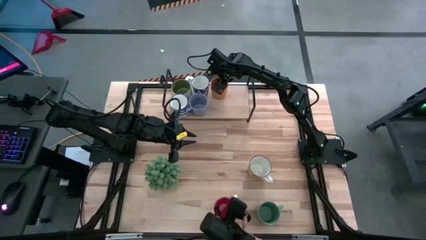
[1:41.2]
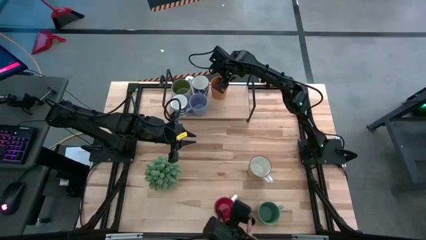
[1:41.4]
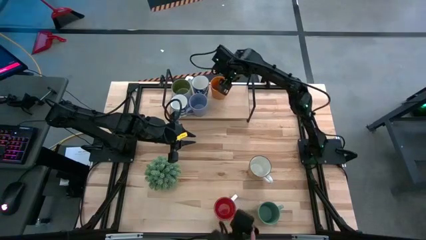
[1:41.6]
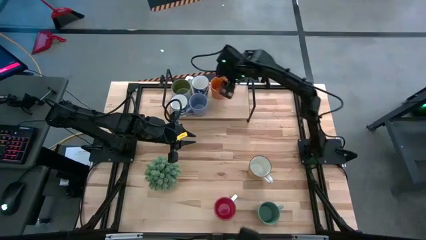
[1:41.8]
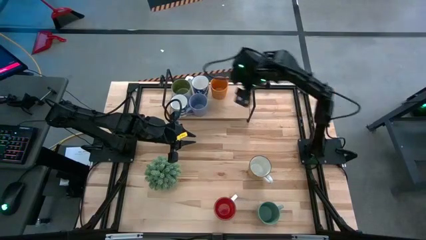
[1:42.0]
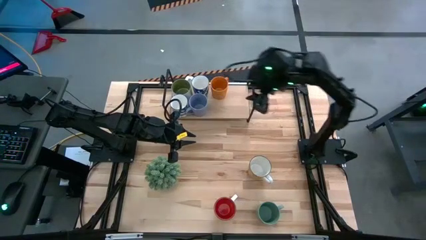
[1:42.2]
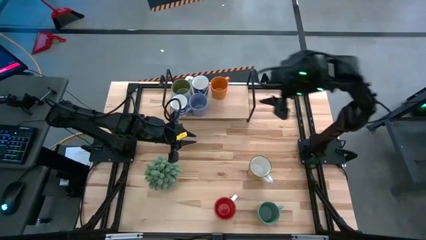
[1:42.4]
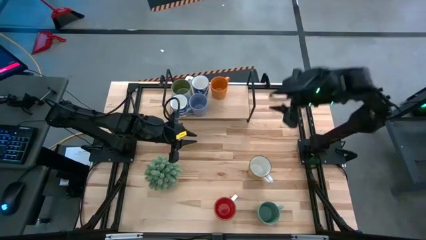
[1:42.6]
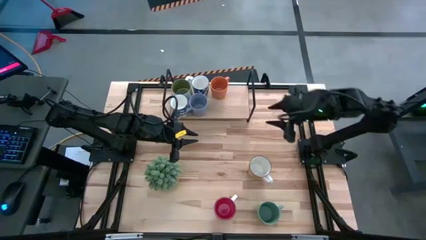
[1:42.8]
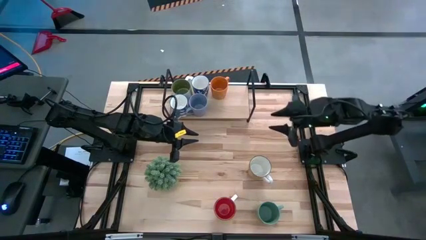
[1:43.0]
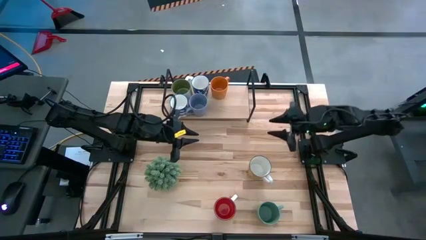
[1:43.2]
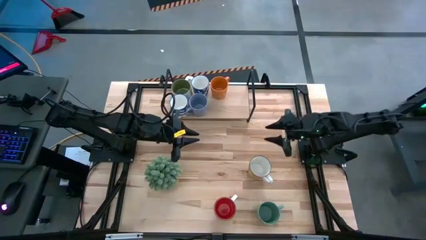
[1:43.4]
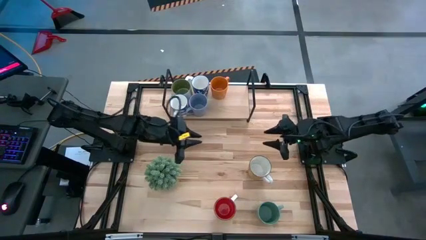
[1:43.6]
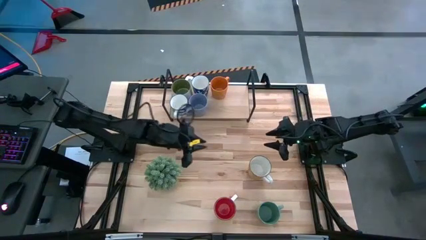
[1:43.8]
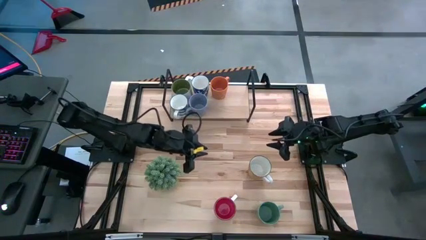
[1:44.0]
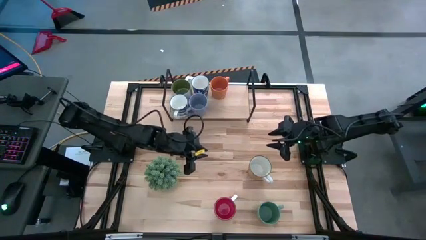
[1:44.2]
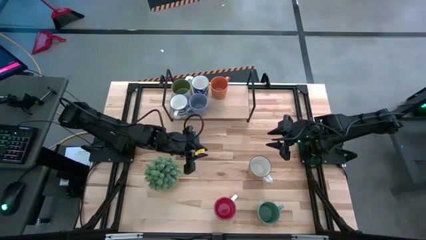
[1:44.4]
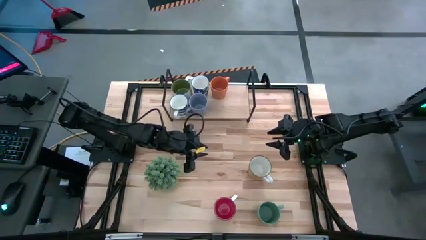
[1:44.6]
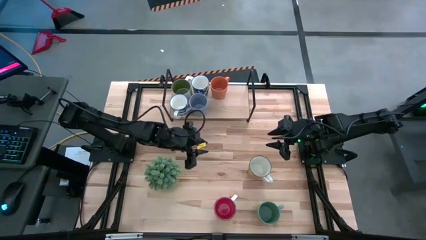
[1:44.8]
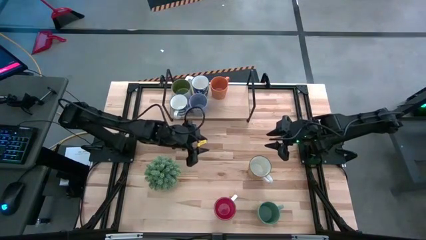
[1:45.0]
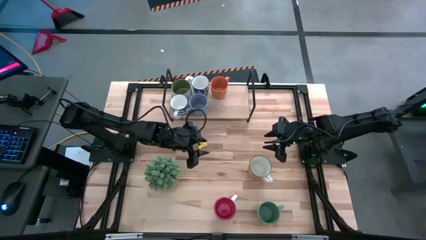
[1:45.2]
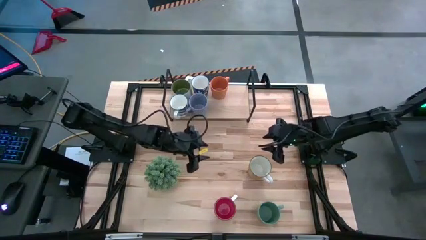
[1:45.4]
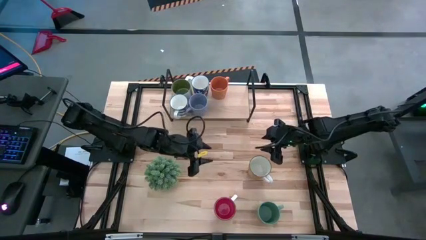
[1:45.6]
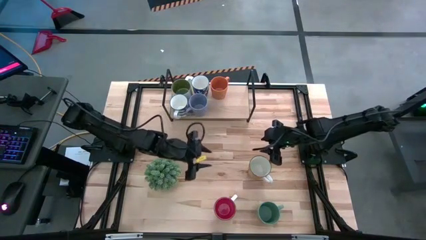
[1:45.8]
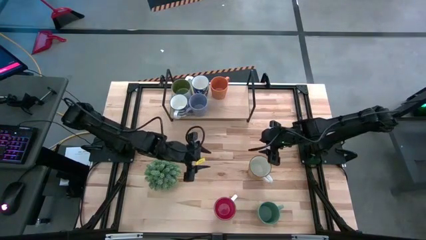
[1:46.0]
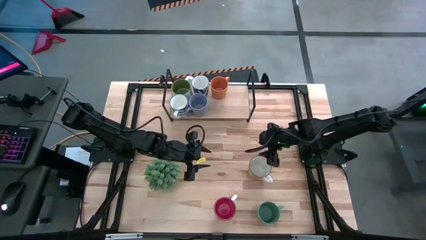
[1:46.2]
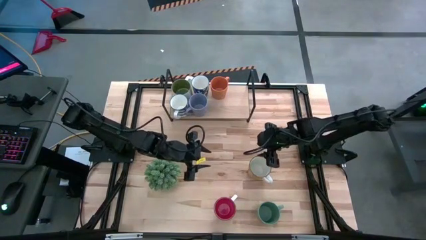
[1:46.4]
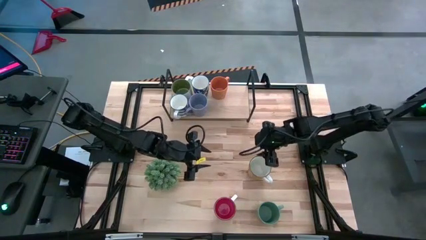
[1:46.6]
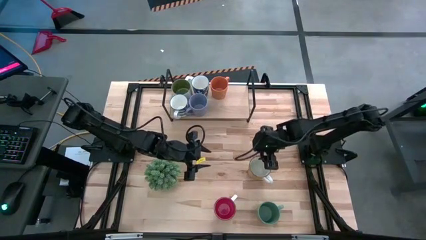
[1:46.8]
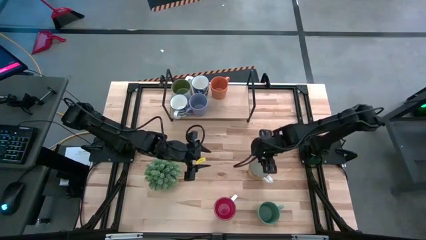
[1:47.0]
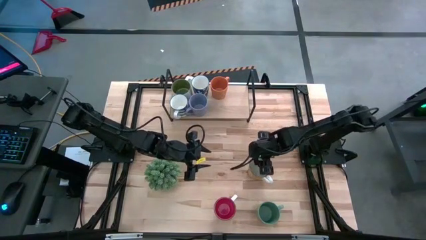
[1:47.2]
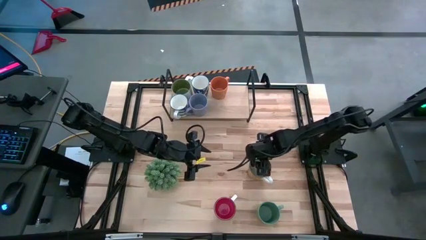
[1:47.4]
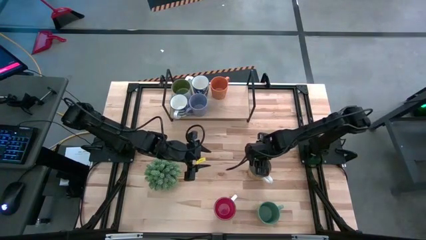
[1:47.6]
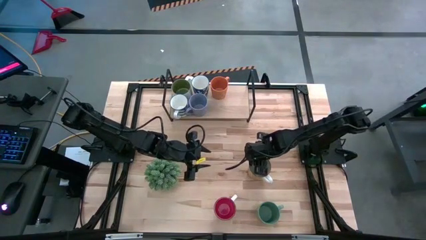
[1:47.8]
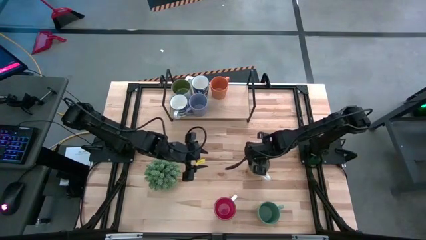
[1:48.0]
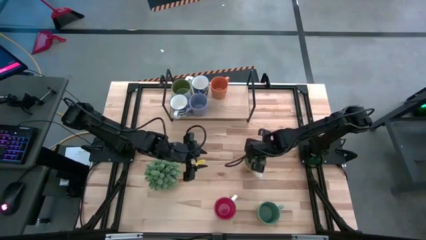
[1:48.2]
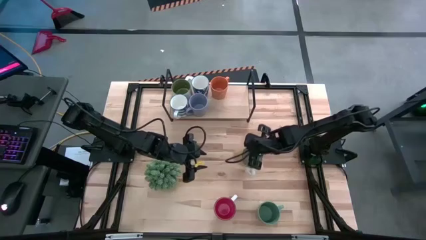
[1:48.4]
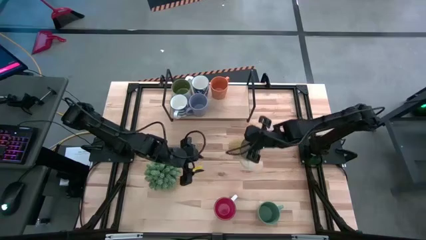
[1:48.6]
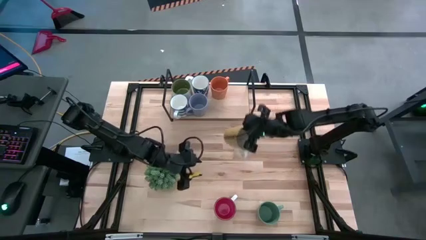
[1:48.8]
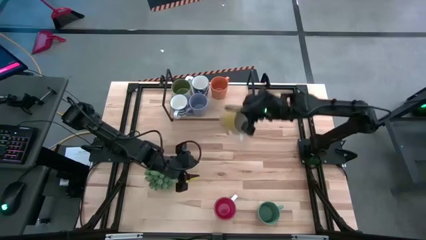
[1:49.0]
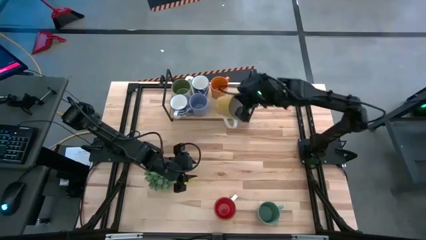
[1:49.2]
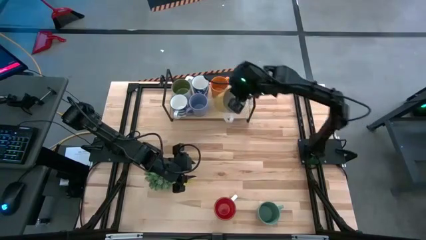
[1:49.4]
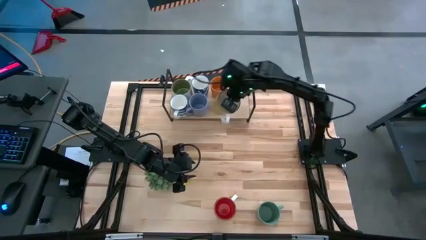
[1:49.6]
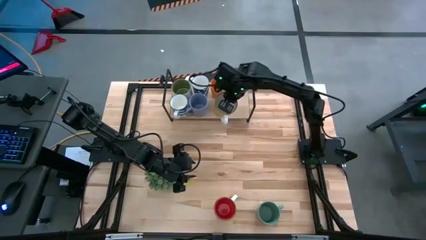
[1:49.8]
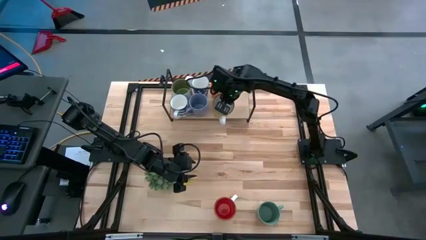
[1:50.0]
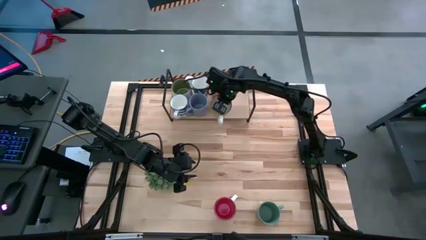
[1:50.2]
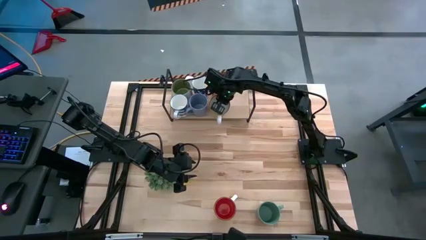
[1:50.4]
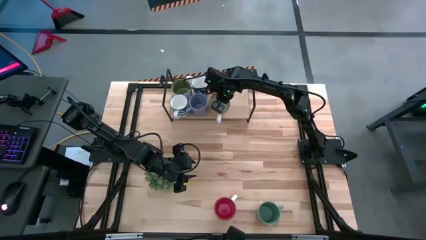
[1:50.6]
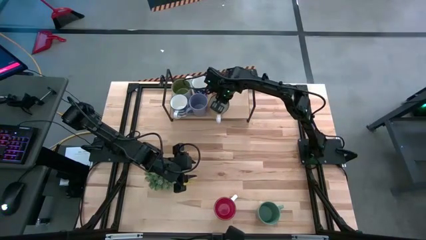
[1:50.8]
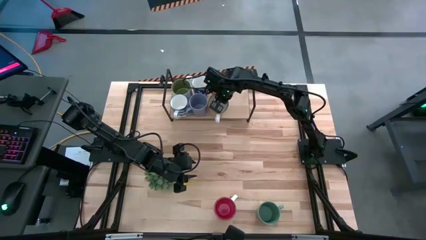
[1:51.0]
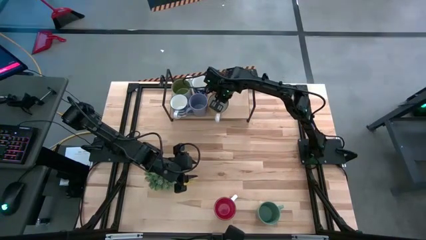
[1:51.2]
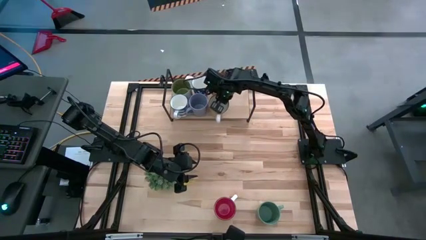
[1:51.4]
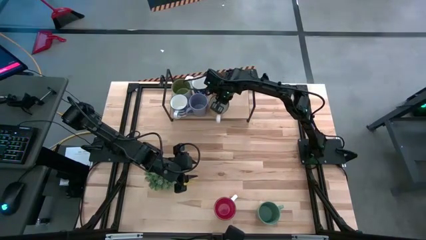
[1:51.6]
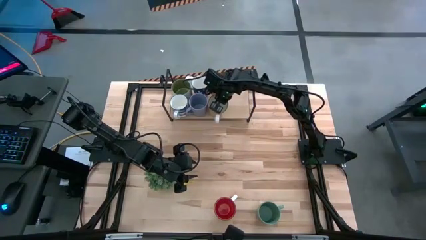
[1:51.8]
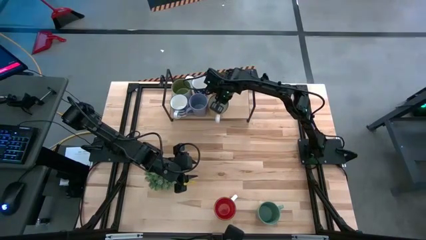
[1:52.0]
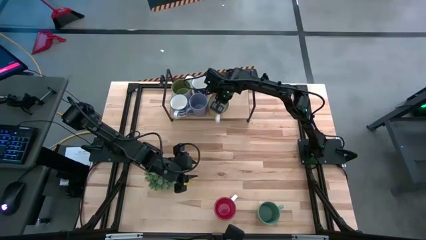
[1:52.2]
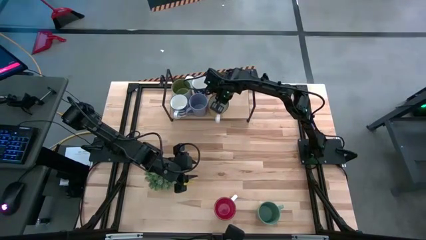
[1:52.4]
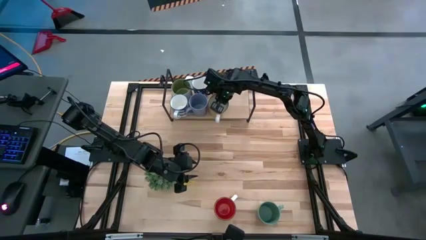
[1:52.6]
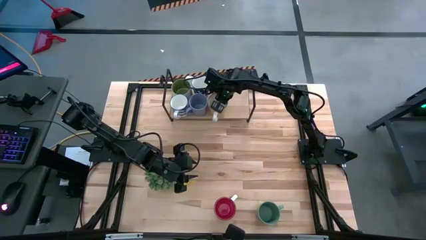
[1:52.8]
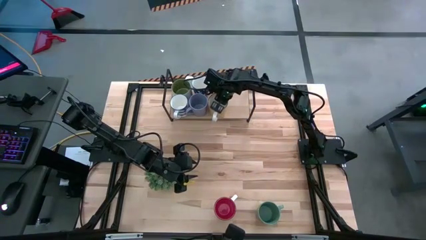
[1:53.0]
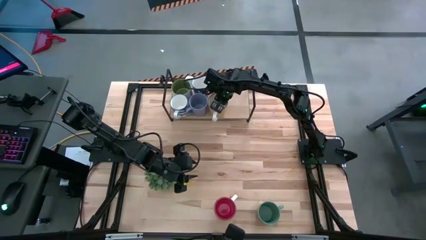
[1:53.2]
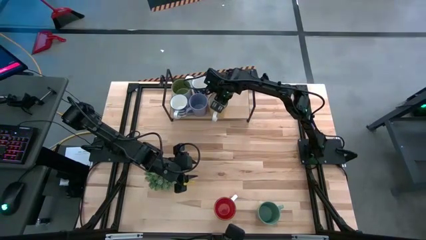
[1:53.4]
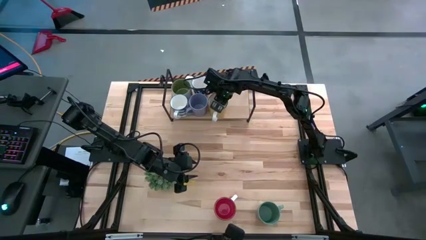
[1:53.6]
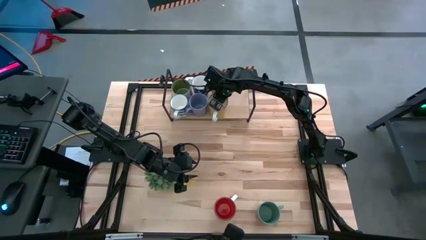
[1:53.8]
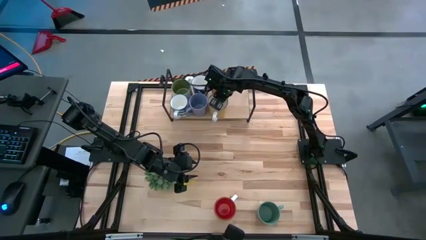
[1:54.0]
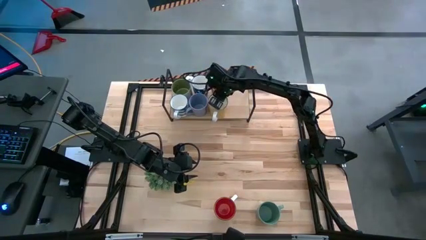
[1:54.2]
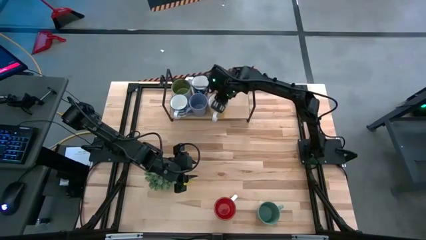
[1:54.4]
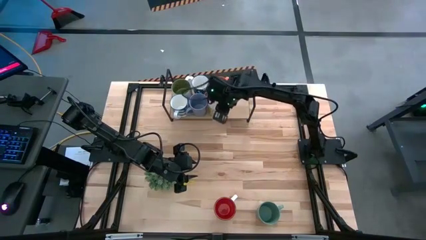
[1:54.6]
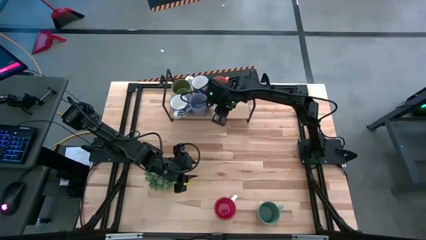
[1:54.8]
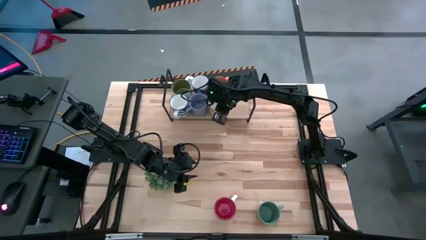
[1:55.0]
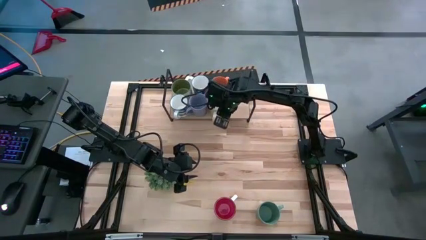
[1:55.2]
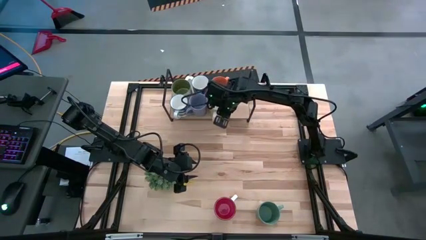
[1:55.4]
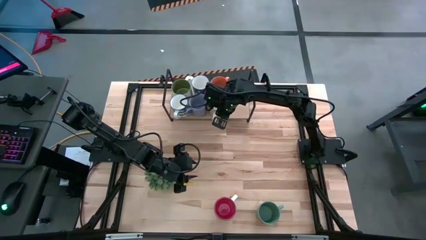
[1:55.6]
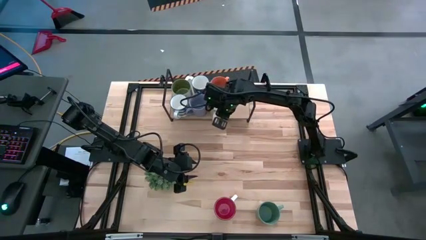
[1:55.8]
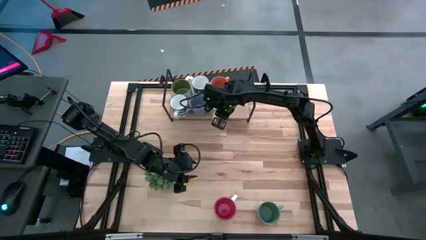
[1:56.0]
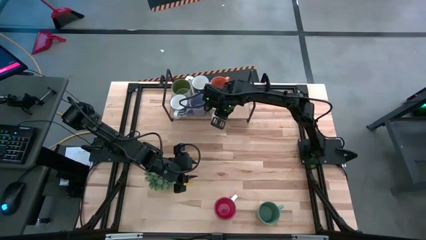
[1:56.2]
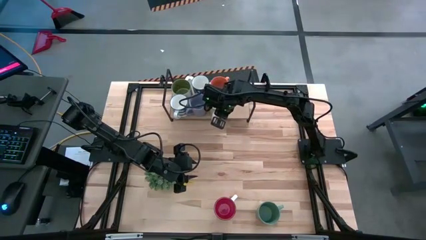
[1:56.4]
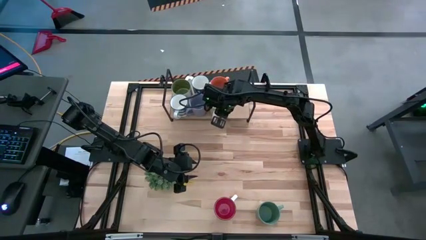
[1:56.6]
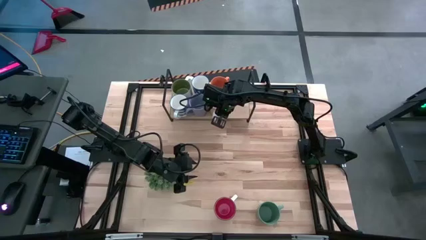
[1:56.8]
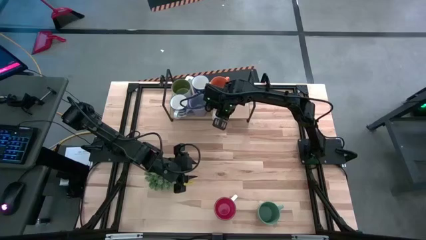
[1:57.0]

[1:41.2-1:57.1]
Task: Place coffee mugs
Put the yellow mug on the shelf aligned with the otherorange mug
